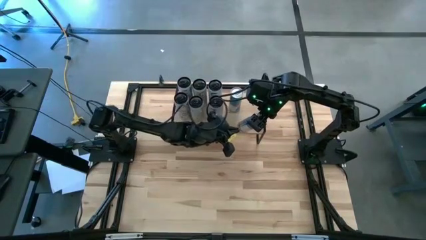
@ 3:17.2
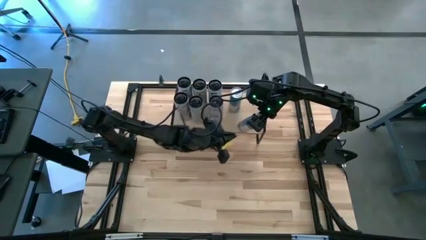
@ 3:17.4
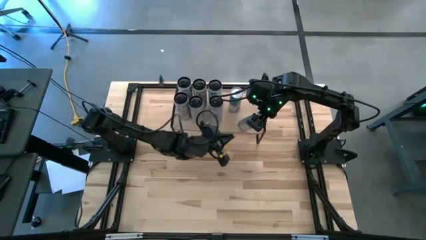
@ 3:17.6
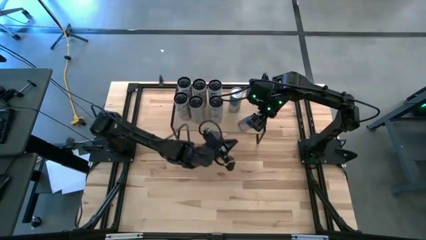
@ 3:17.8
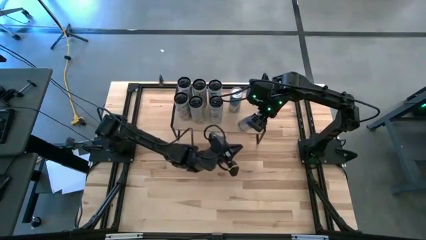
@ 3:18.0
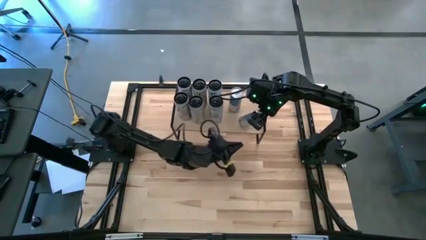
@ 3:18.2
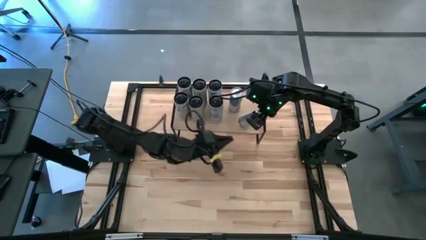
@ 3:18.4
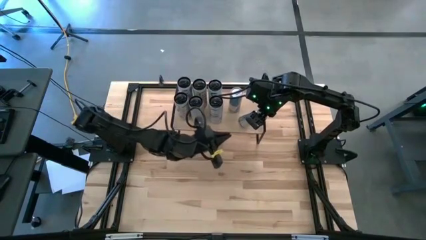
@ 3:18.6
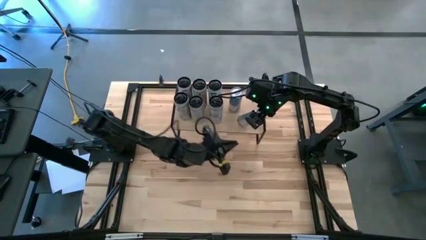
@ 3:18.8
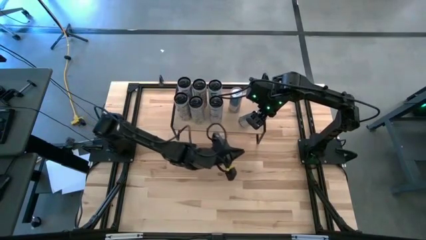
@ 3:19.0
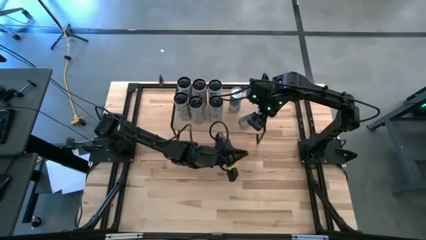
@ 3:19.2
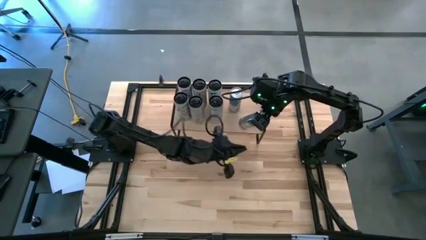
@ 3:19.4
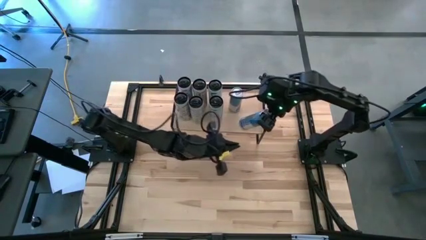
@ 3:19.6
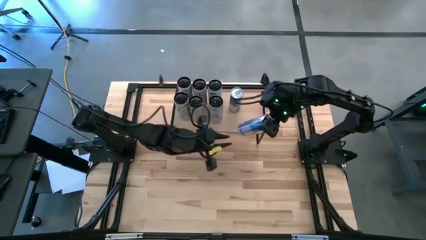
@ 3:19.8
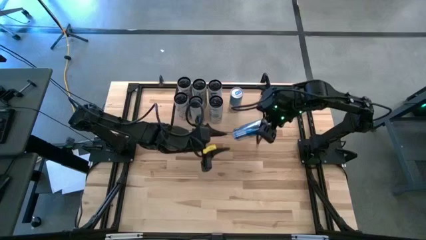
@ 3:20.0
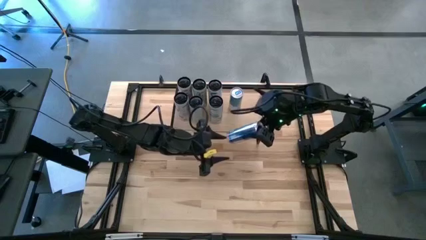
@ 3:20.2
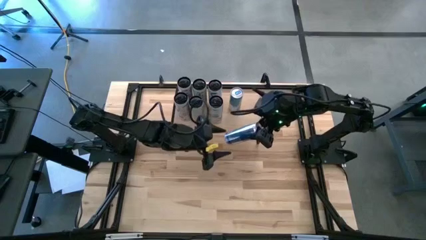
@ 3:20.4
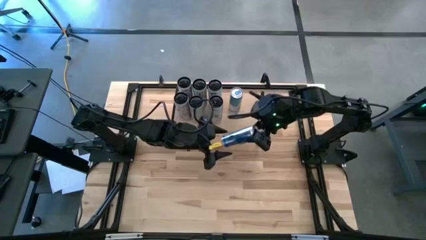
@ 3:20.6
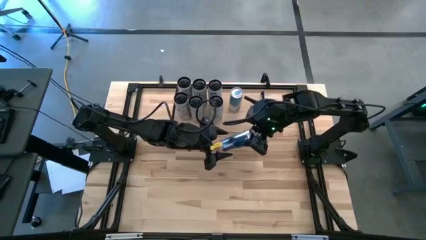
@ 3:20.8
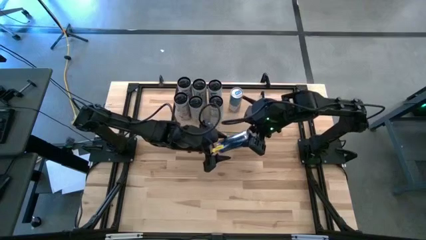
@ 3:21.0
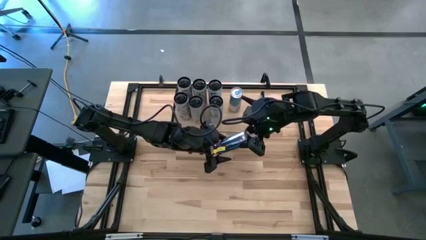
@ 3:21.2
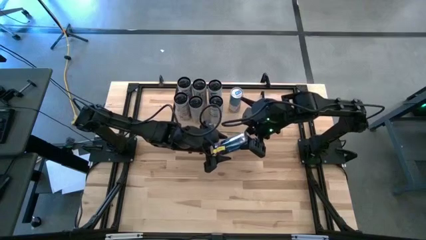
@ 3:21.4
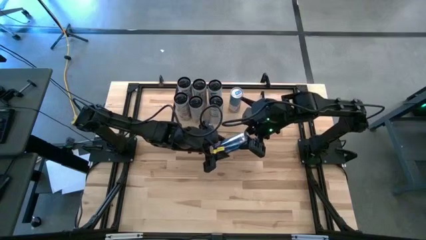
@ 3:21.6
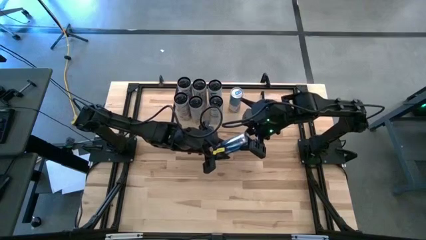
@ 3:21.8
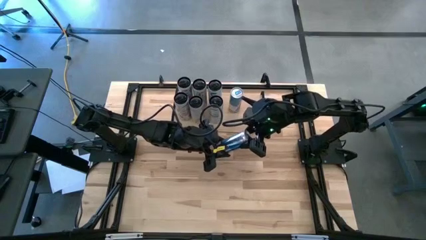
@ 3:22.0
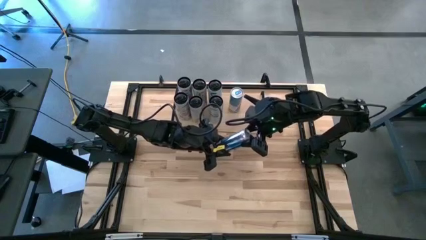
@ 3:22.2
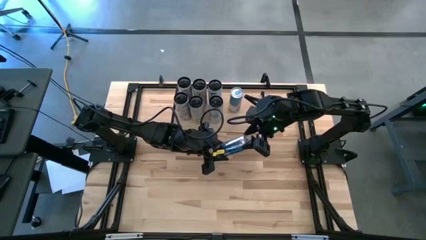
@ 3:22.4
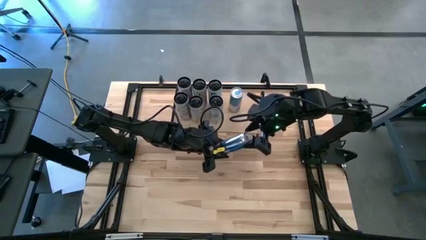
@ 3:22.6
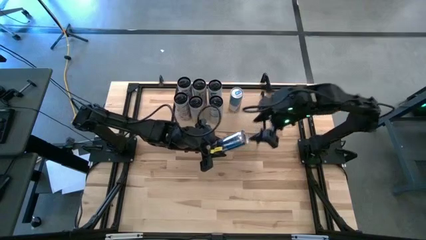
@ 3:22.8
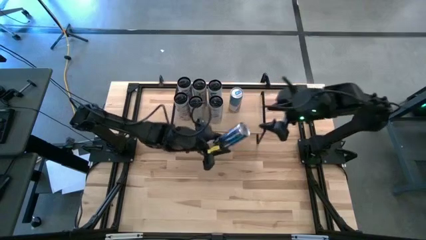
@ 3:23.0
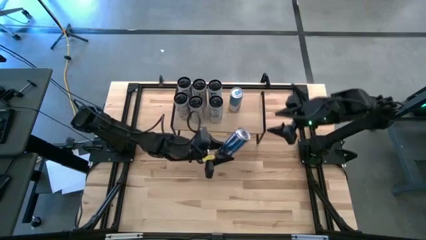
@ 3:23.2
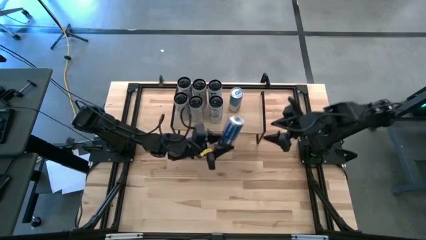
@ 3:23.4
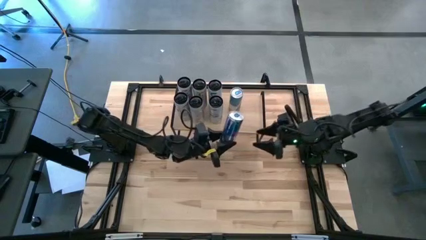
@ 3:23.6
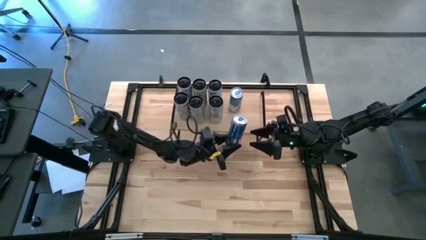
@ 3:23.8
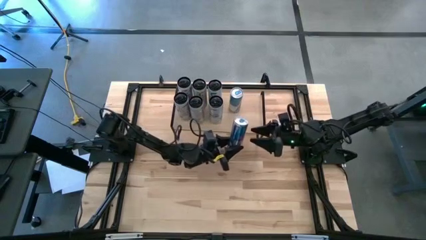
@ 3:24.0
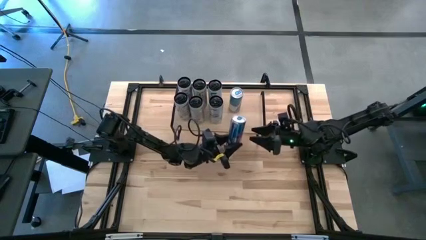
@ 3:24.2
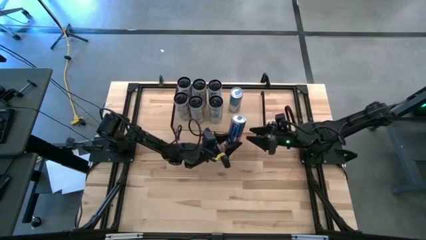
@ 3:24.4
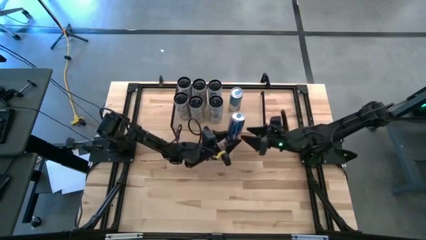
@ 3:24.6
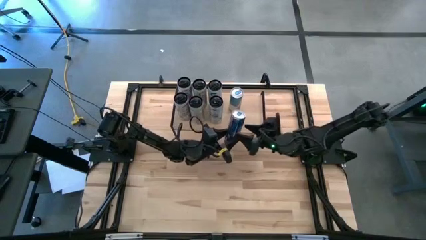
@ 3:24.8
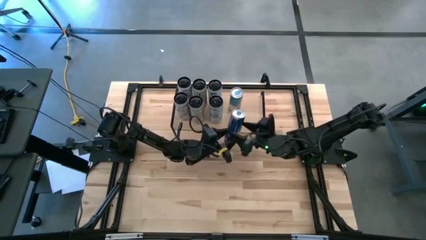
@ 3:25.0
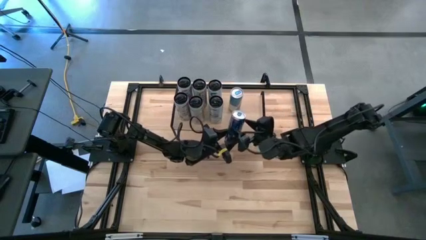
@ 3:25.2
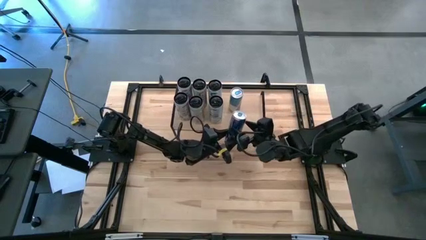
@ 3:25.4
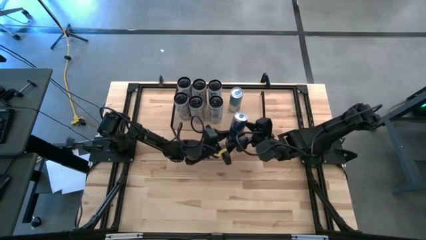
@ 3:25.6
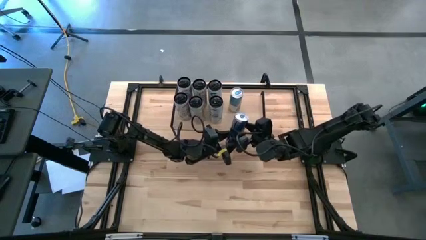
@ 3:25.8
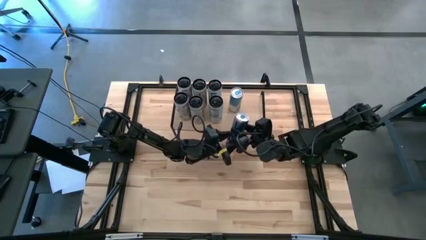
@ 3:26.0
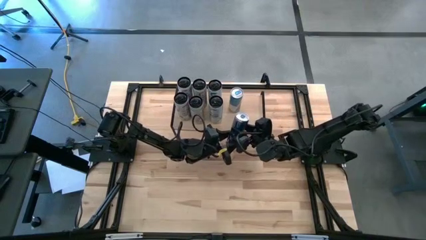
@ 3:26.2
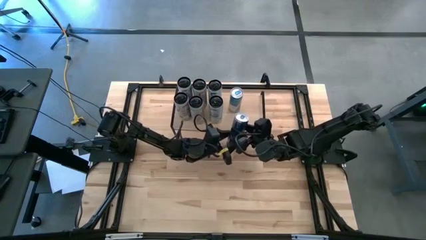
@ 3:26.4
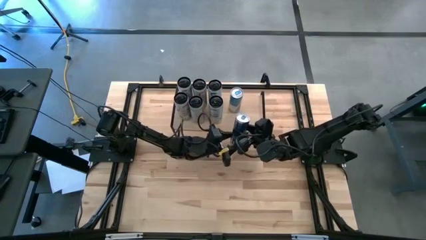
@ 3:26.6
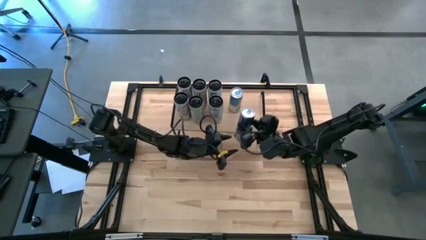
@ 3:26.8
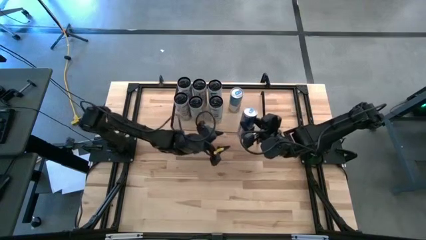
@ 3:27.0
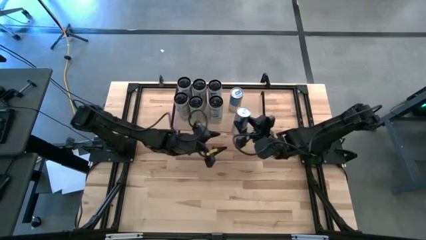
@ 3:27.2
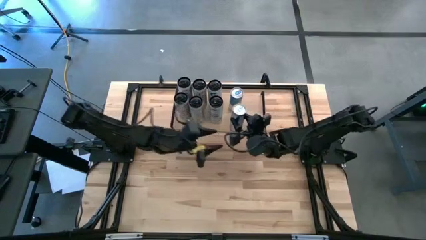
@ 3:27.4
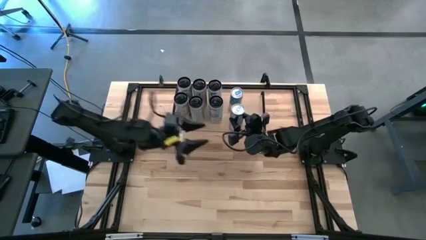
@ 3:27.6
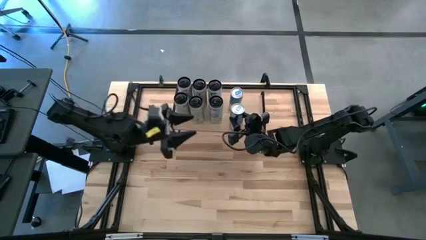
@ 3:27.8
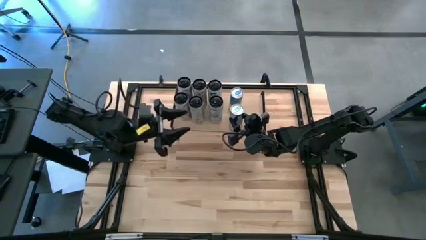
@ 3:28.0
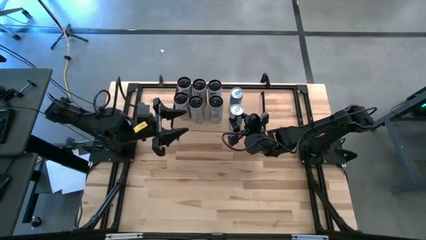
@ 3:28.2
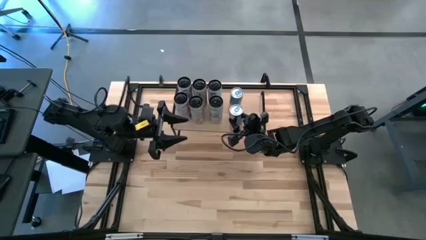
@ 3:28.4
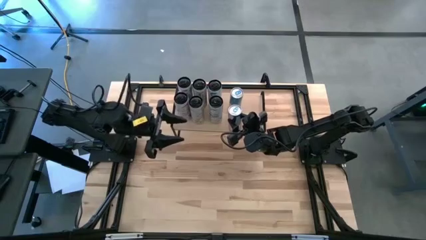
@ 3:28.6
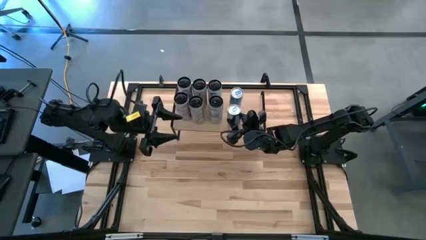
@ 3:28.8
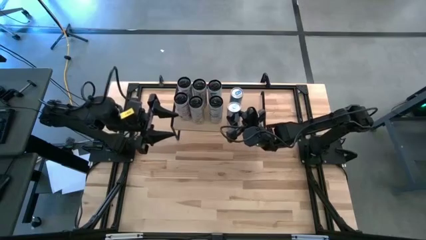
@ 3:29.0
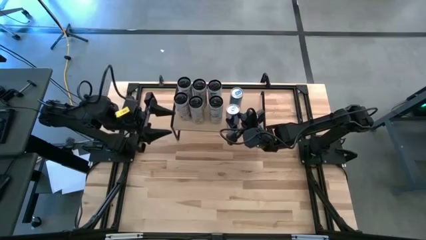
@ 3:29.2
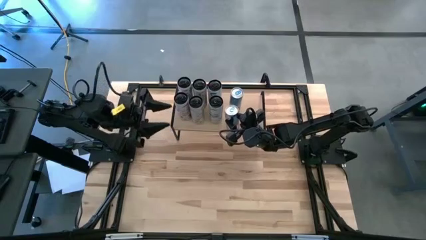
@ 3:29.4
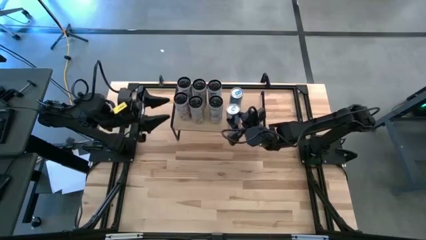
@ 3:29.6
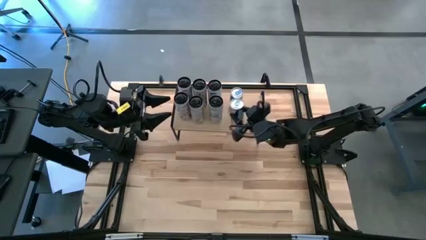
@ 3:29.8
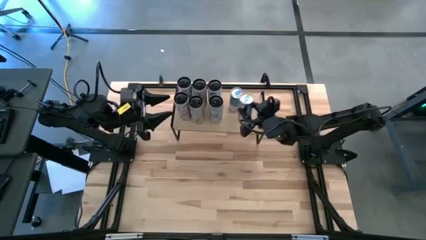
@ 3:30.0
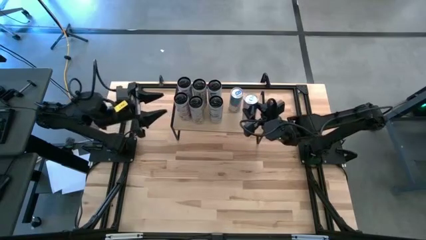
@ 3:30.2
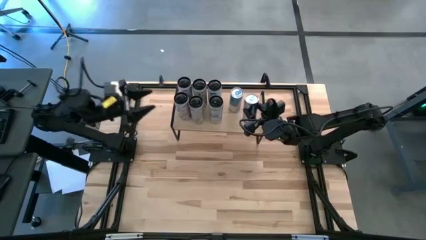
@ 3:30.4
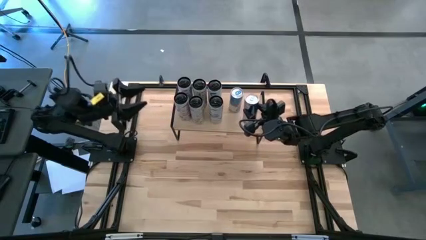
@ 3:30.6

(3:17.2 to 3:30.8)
Task: Place canned beverage on shelf
Put the blue soda can on the shelf aligned with the other blue soda can
